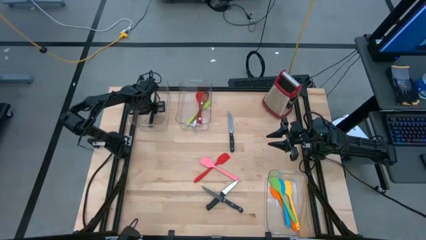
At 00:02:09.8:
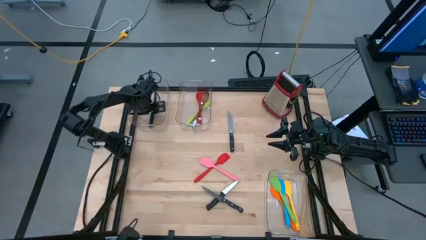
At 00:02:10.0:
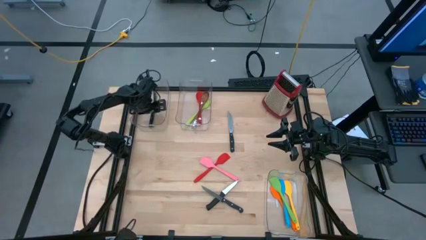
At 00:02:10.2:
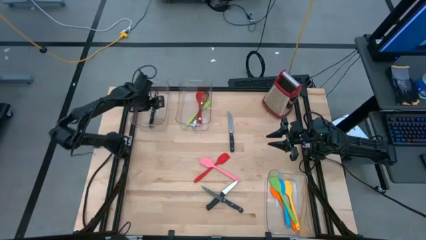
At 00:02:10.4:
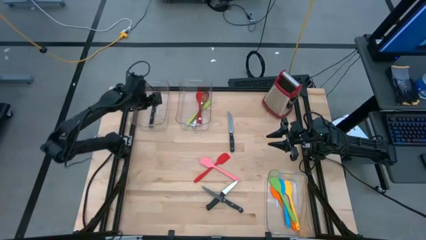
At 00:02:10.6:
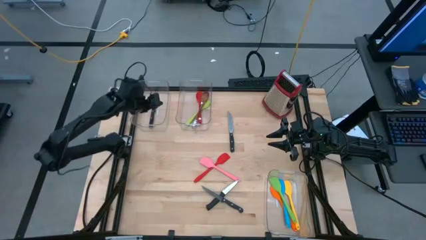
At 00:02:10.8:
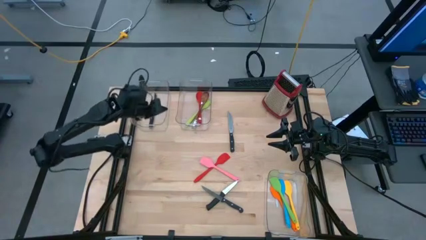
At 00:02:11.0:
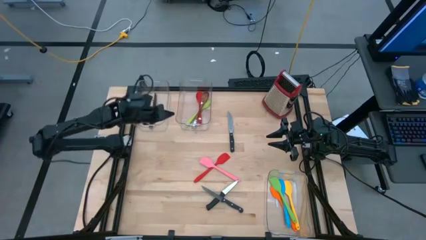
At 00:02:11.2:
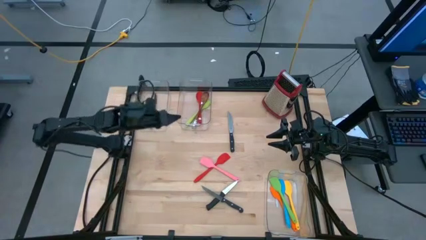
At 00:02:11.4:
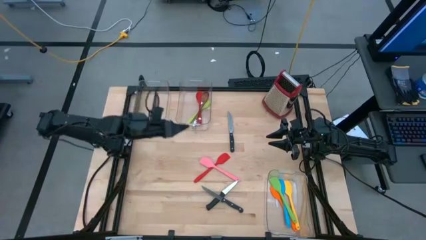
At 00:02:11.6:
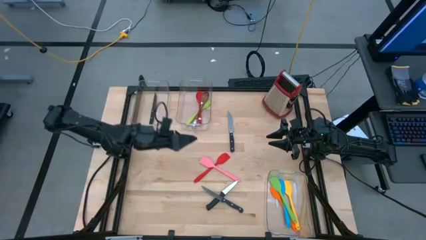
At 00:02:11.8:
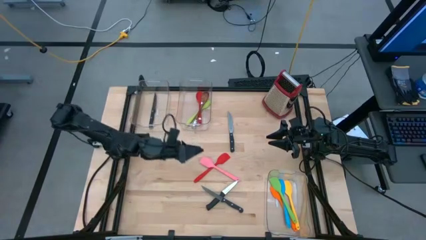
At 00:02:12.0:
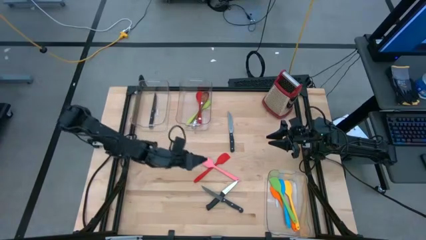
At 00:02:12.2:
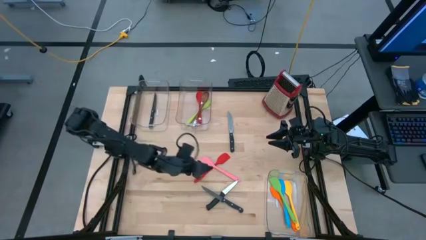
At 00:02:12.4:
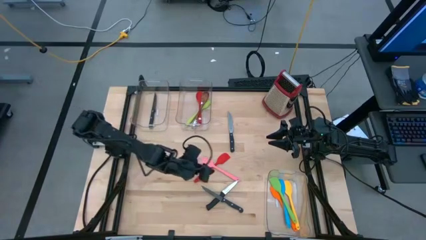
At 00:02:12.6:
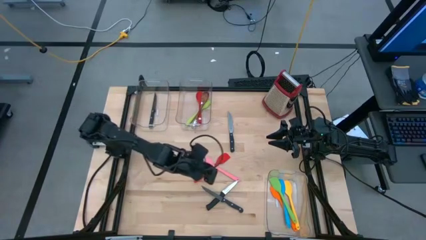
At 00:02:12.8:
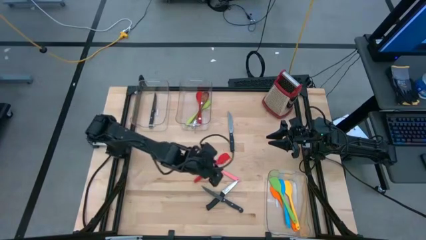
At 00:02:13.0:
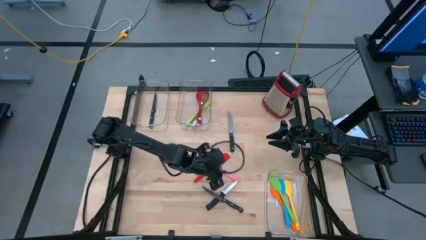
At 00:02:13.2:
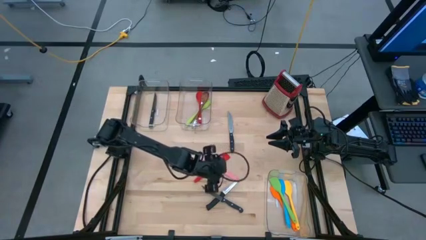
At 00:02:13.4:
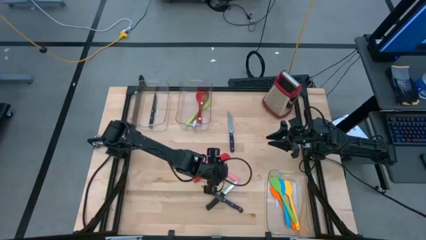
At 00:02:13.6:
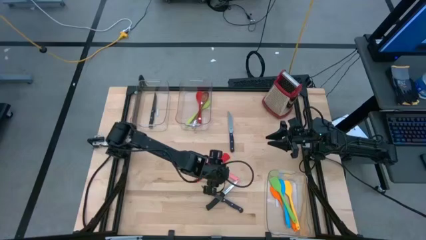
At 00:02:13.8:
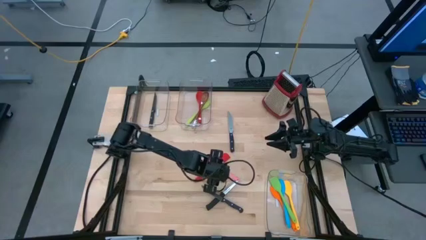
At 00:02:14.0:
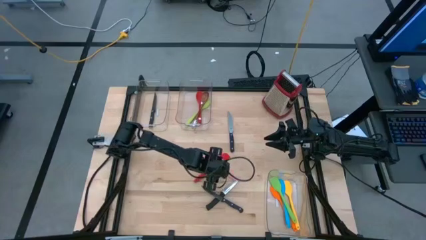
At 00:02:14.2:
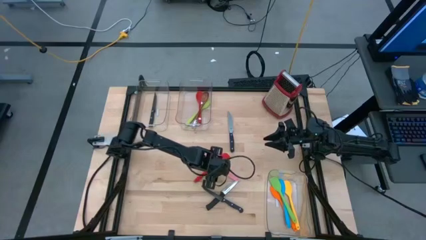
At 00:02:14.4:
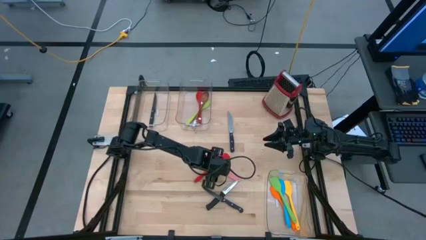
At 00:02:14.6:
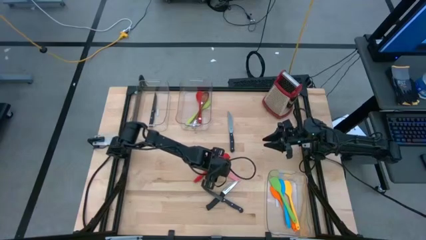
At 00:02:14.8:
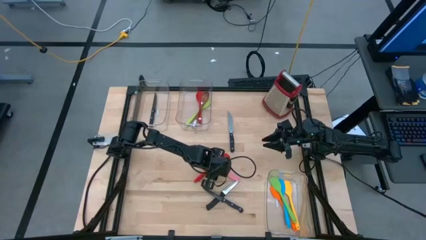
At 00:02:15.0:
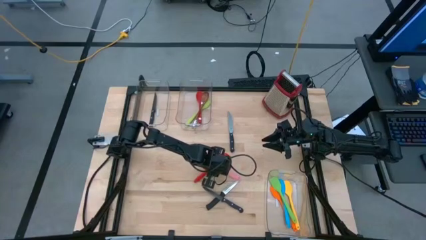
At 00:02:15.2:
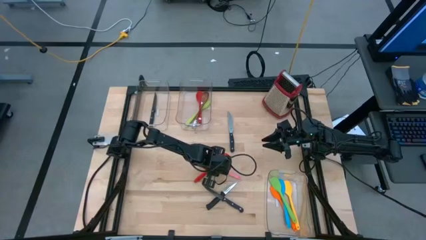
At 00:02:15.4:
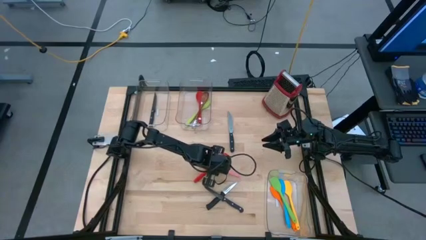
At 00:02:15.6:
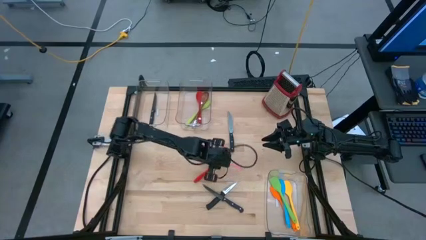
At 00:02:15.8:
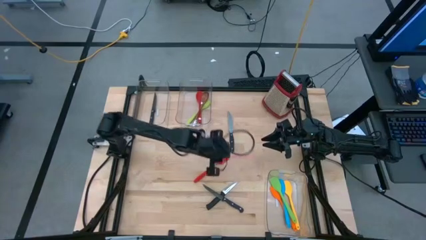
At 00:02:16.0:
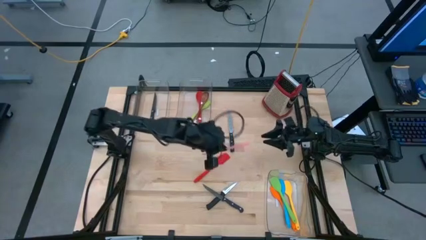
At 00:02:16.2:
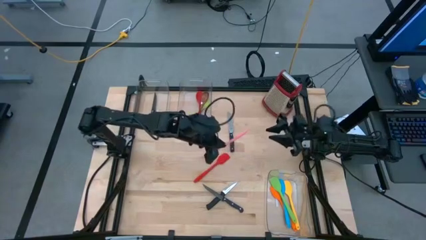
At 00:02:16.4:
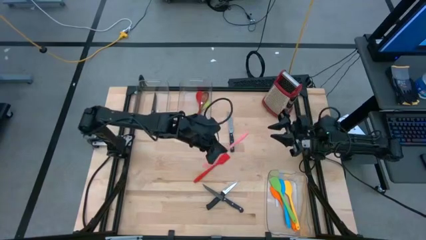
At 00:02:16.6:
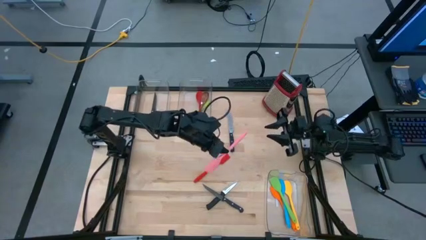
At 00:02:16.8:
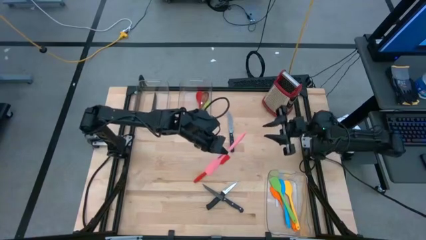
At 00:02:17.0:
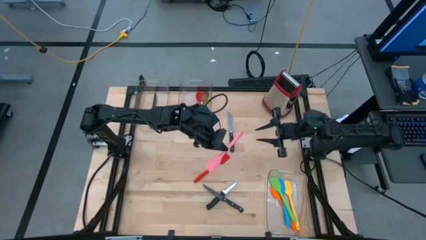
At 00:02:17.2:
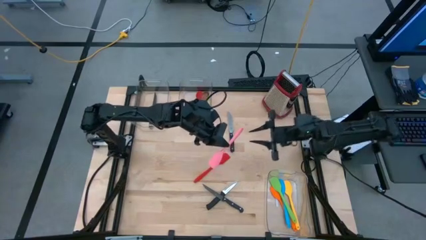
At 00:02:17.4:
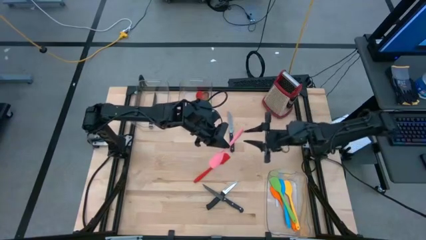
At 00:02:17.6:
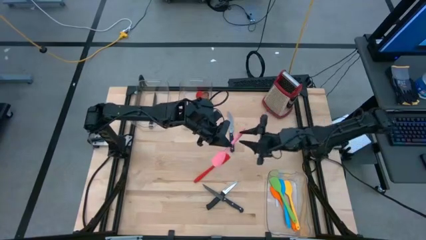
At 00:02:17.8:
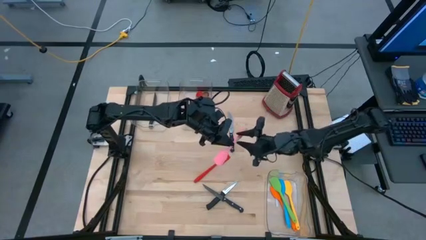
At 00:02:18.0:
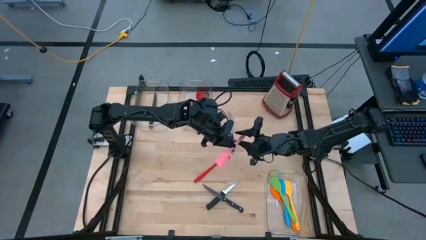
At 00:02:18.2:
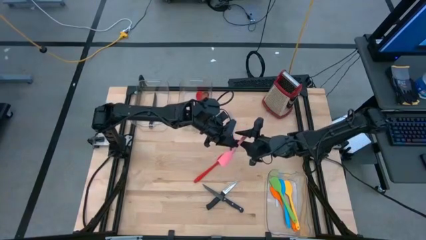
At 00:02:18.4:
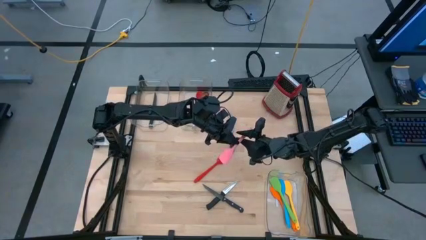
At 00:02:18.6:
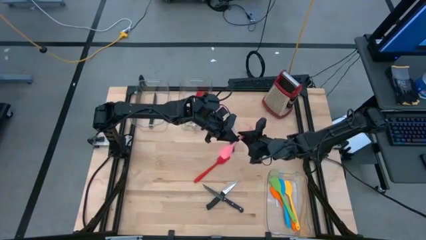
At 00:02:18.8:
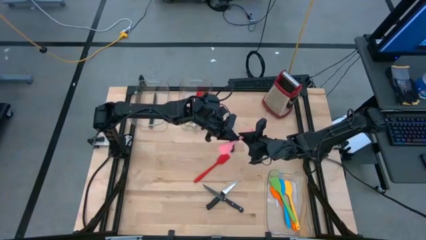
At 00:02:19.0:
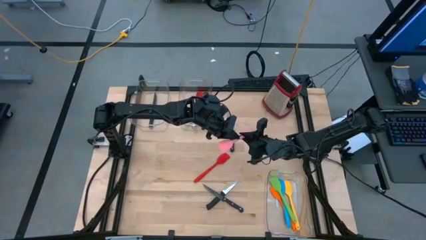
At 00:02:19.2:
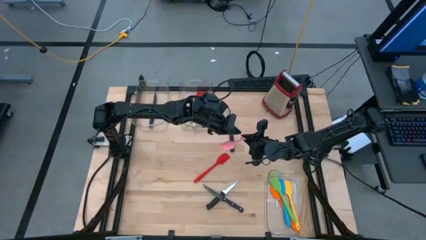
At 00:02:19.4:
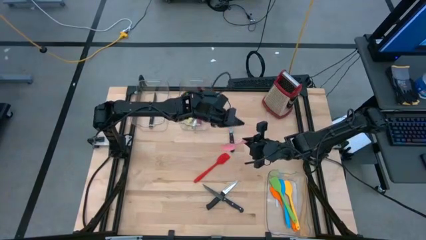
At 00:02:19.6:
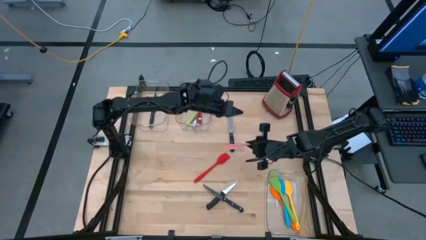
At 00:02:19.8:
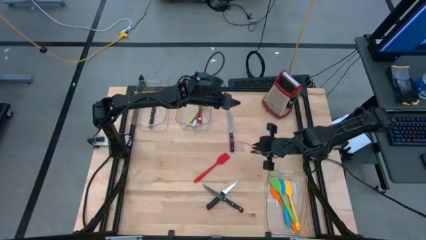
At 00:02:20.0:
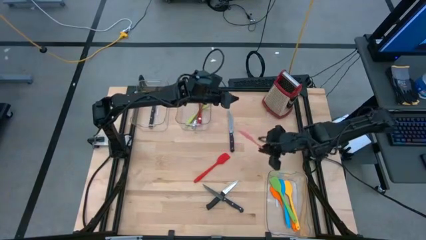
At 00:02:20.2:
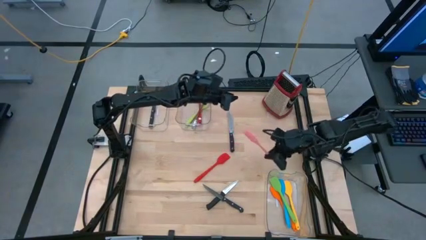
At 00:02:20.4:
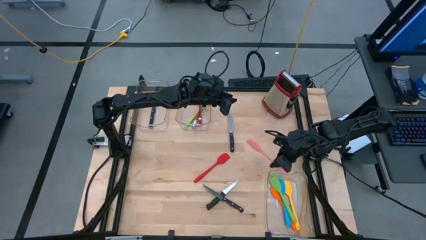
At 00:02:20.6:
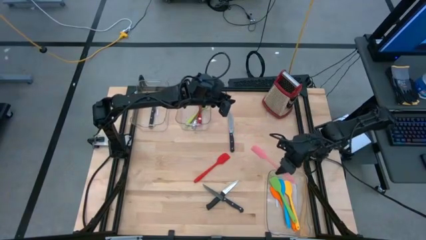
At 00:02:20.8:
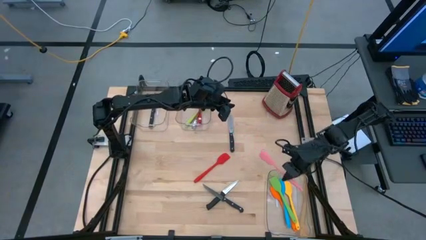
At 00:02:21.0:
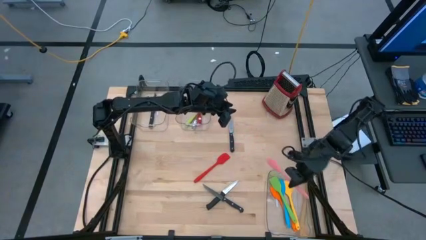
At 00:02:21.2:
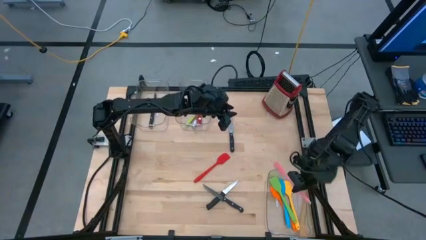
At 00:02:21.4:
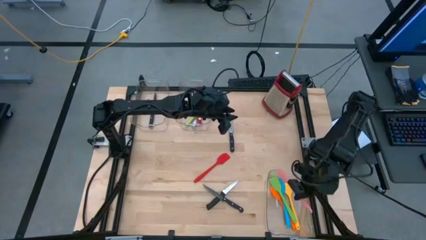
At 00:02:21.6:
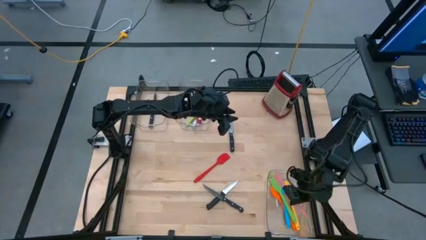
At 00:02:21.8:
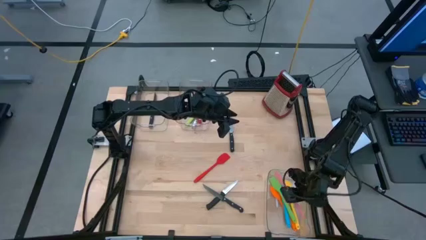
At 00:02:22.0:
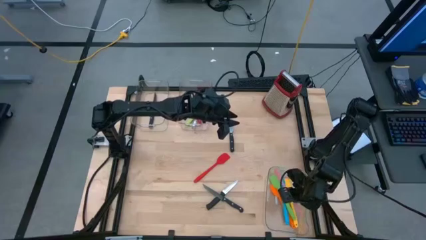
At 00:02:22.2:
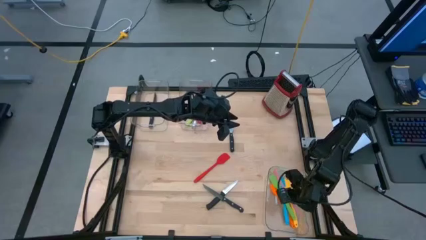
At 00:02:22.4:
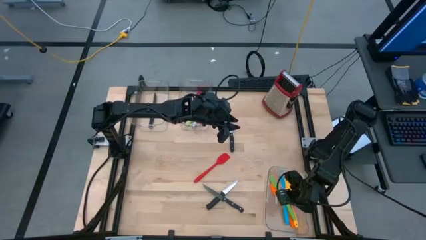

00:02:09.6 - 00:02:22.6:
Task: Pick & Place Kitchen Items
Put the pink spatula into the bottom transparent bin
